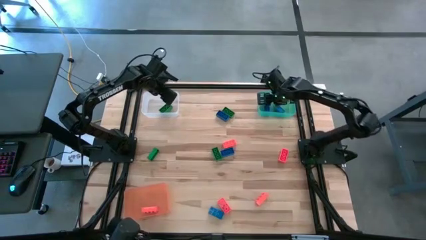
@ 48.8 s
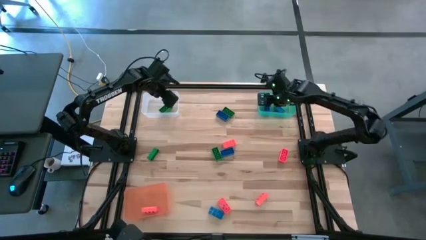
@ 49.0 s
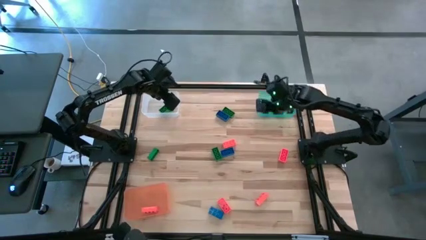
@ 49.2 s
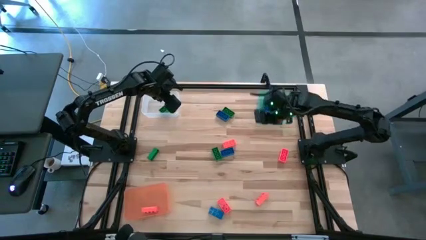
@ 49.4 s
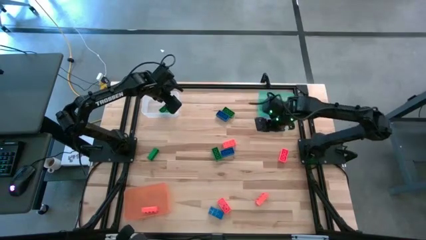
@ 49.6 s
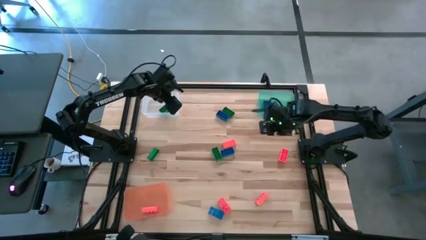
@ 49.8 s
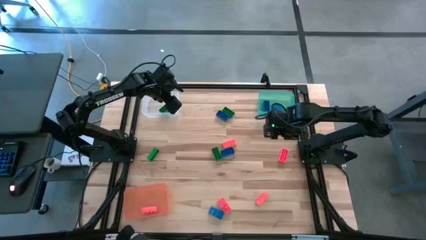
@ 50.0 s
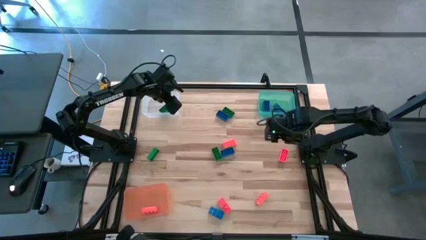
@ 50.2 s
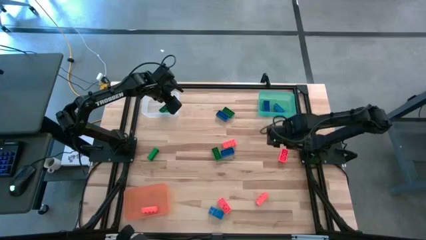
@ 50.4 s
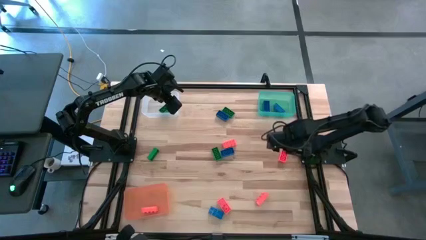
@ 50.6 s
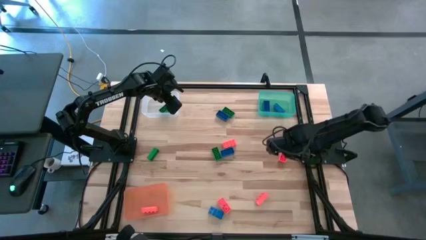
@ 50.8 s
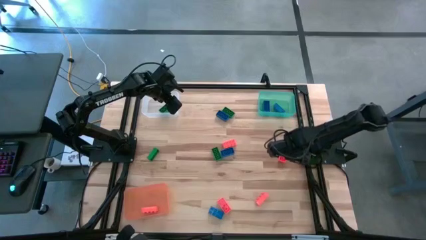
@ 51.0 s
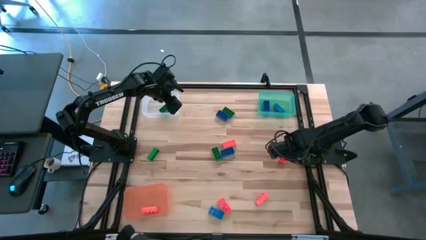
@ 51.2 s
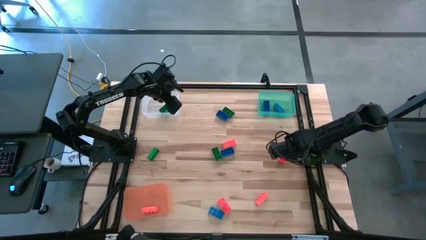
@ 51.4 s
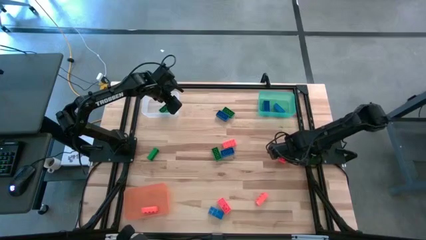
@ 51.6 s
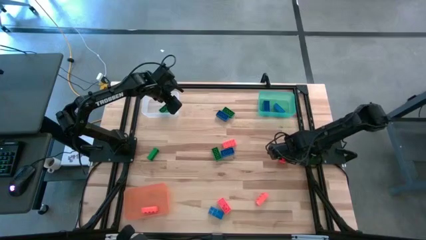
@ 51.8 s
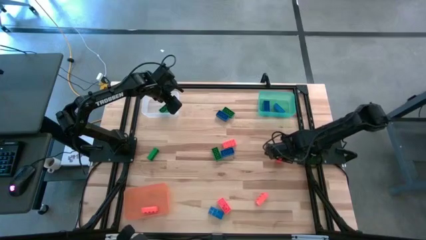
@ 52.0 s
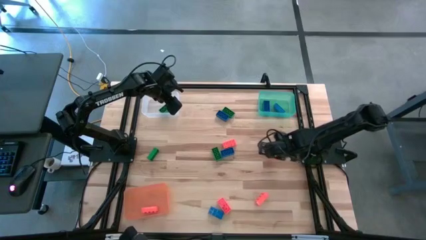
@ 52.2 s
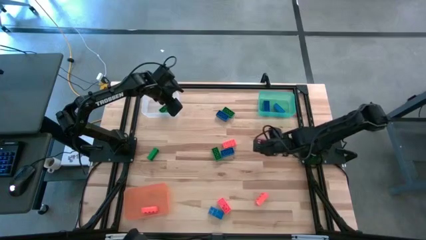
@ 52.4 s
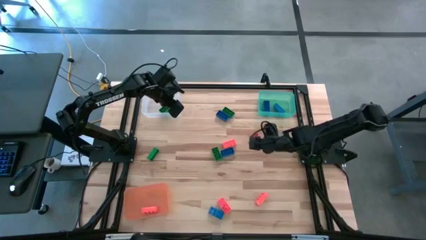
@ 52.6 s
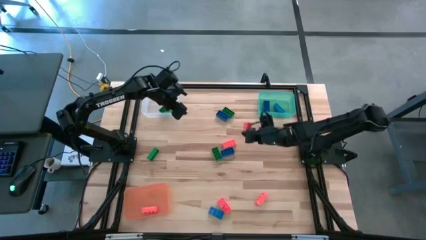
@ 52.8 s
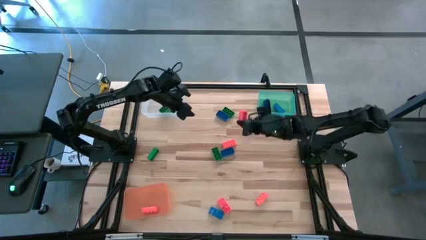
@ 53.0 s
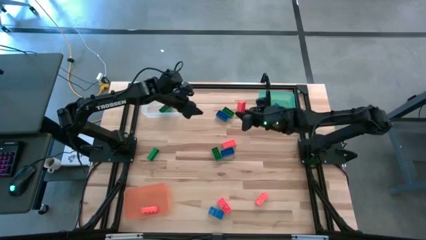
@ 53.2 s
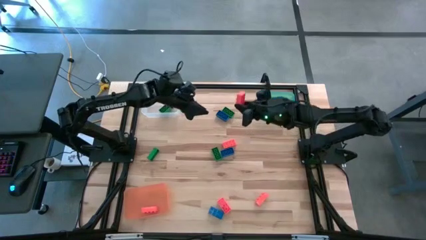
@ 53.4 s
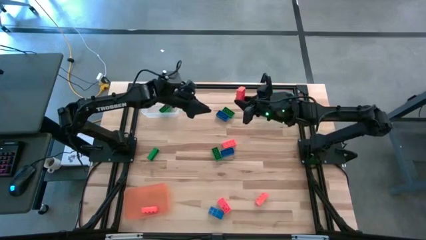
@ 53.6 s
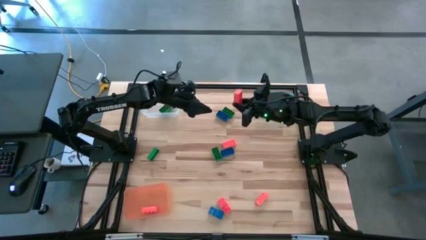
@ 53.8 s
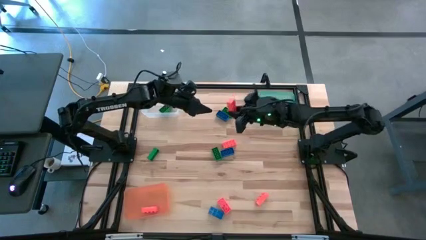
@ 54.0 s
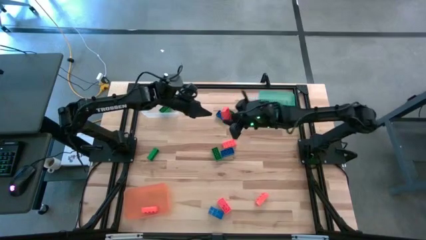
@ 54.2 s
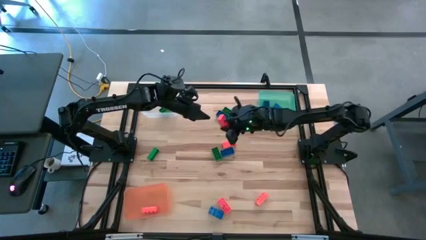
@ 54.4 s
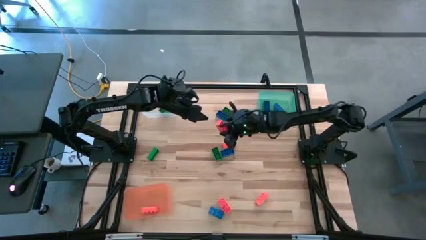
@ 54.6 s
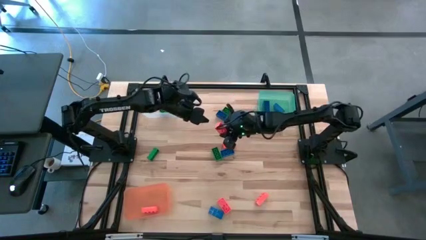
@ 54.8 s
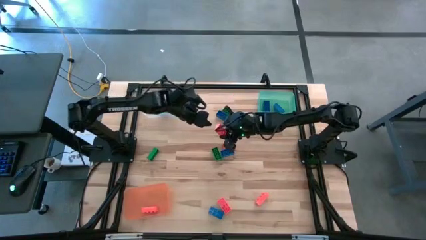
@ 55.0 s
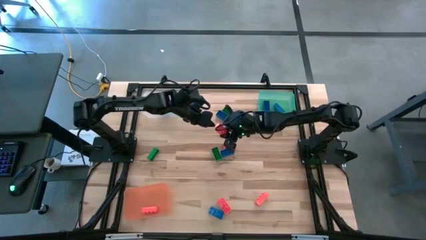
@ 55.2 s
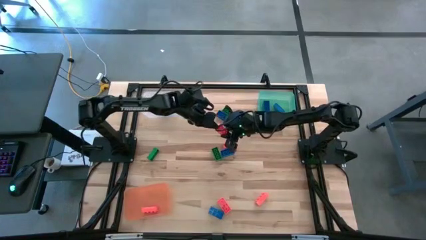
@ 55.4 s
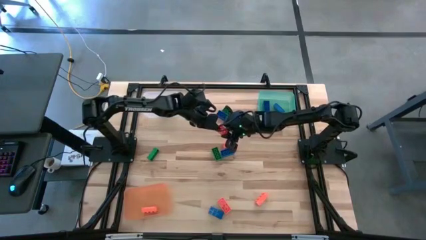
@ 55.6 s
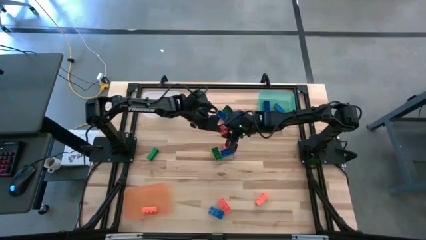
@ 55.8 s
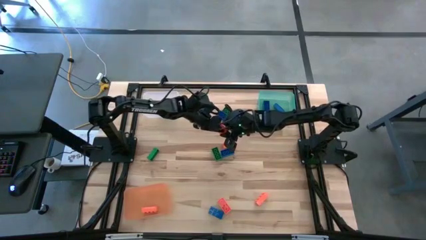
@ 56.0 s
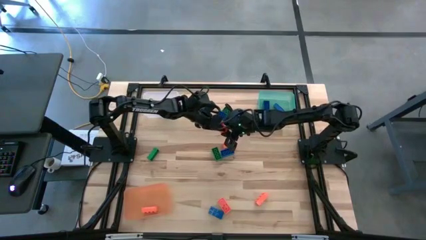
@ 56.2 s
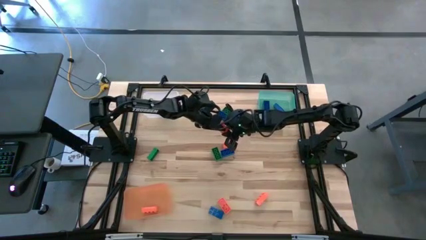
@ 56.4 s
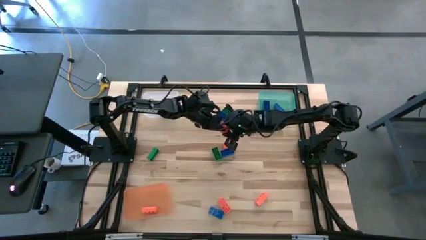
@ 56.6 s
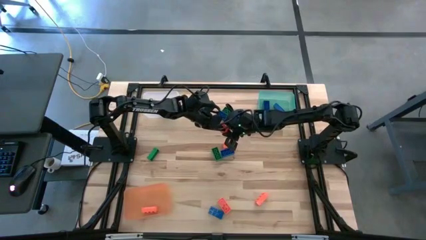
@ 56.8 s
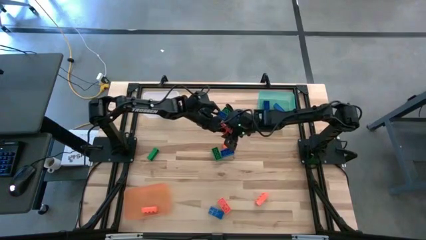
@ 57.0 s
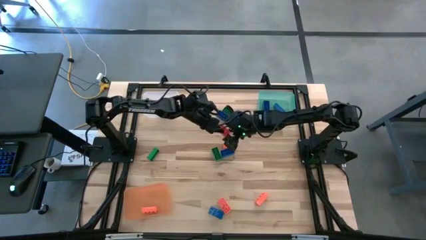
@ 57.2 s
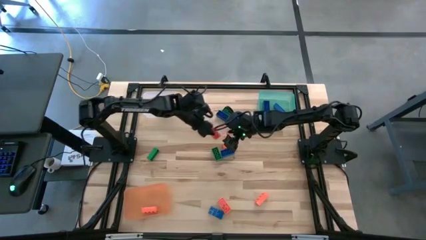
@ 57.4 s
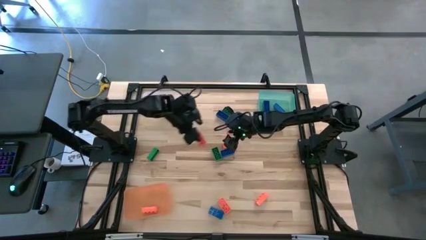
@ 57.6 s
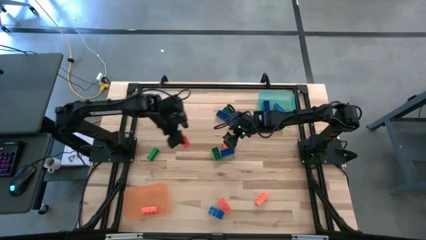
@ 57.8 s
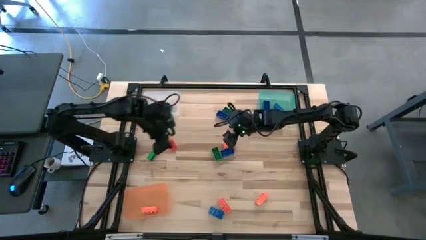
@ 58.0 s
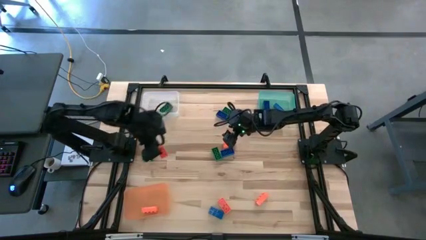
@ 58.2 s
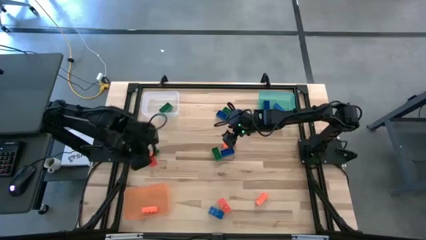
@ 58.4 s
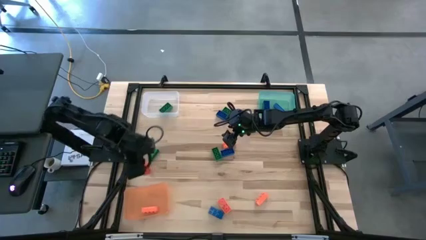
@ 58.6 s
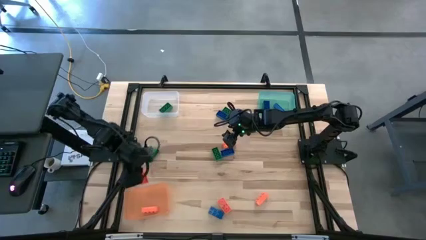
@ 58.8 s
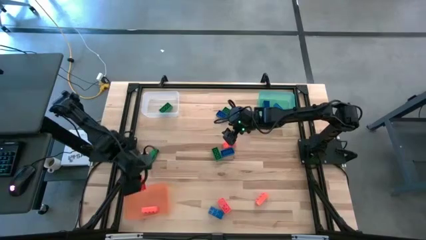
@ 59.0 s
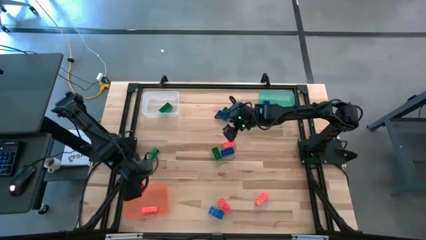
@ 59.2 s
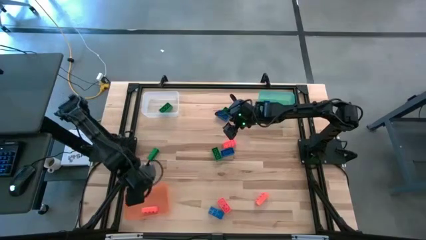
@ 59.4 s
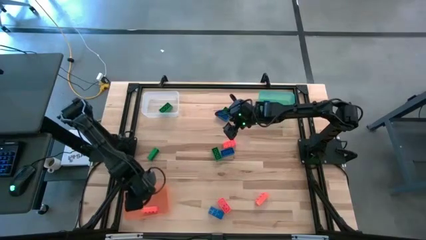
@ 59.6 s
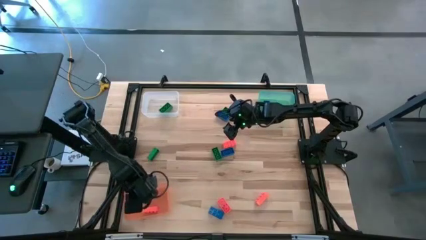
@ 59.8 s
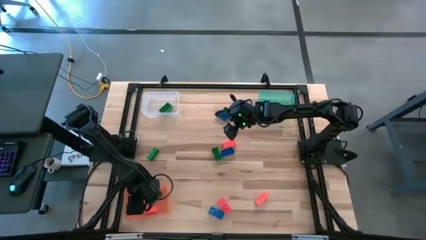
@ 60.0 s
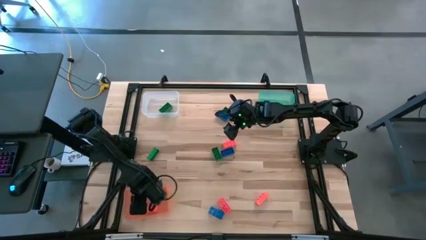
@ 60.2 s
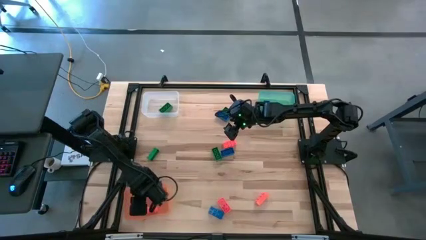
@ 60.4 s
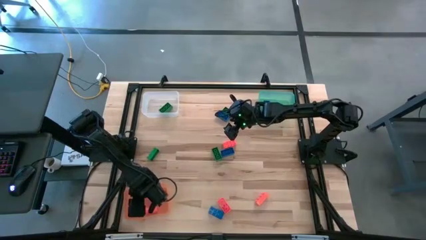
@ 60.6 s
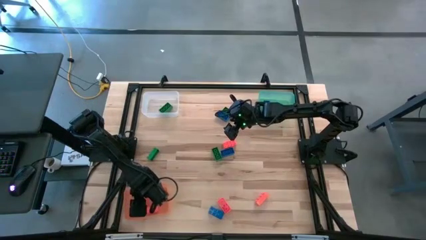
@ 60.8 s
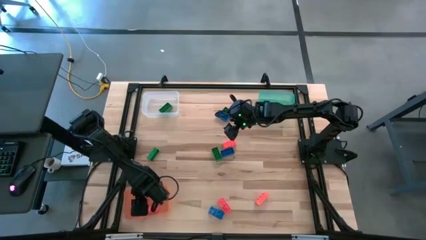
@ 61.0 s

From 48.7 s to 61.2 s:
Task: Sort & place blocks by color
Put the orange game piece into the orange bin
